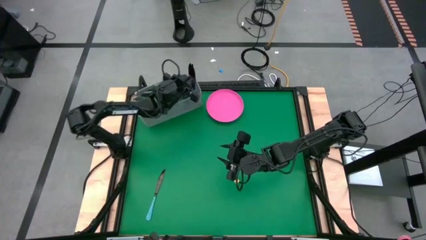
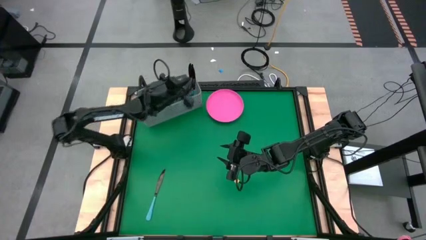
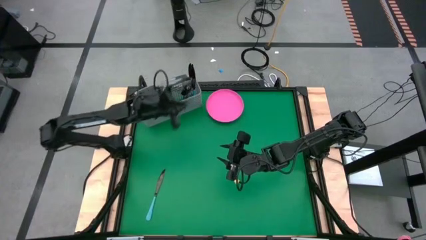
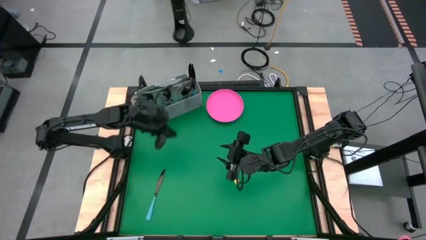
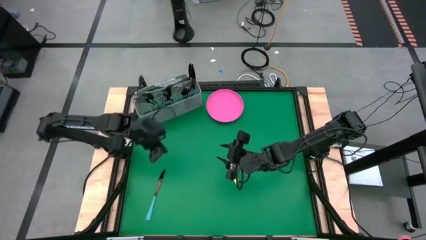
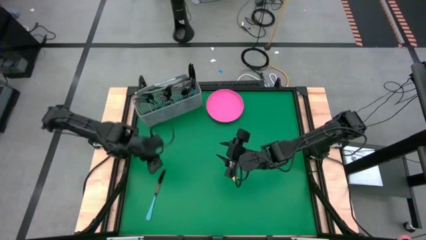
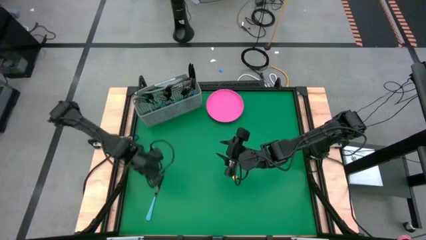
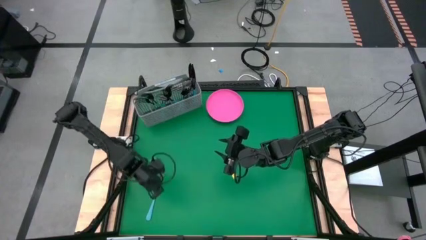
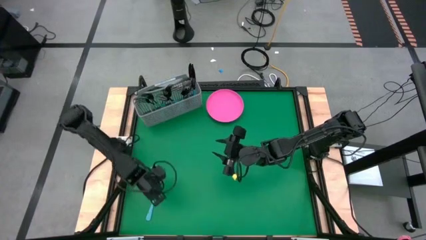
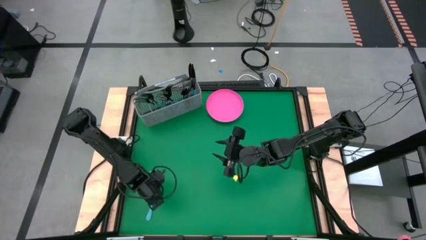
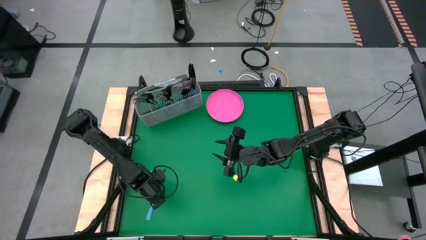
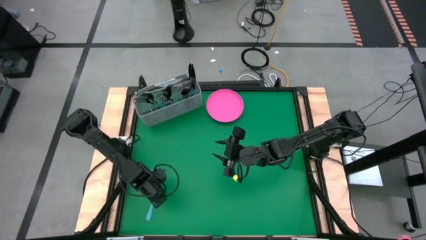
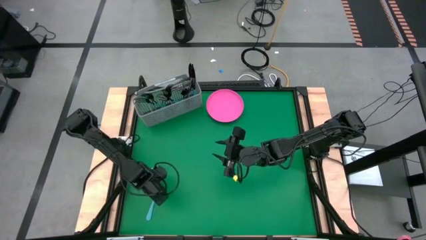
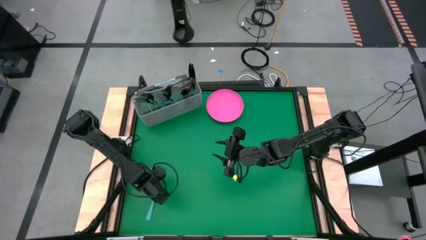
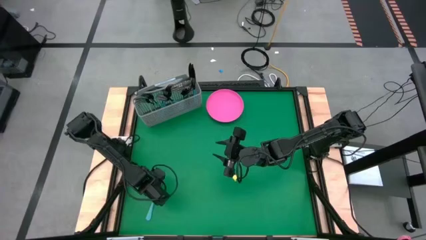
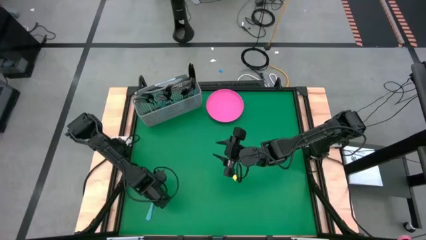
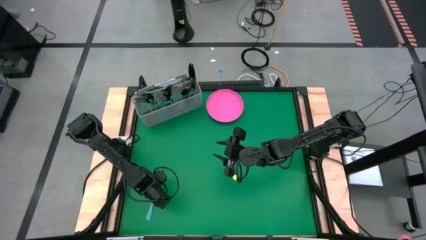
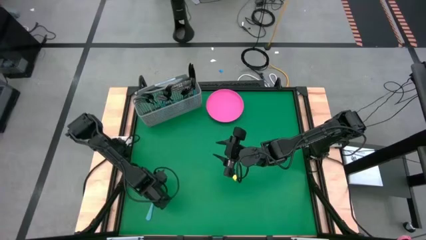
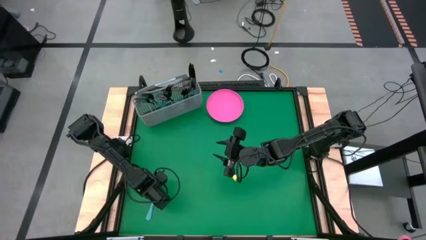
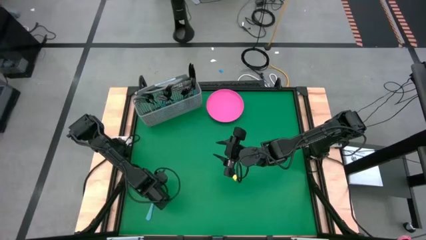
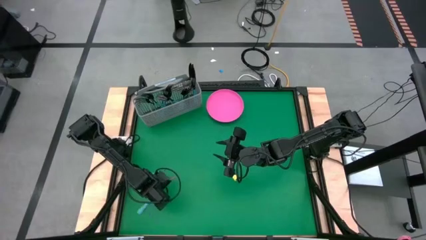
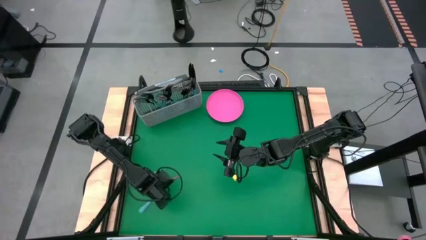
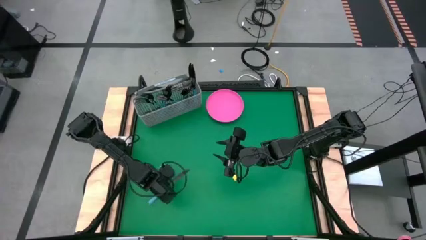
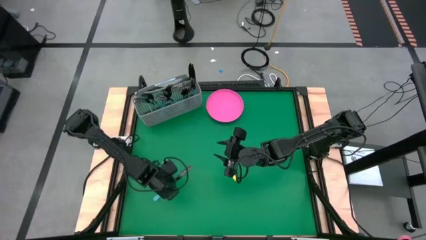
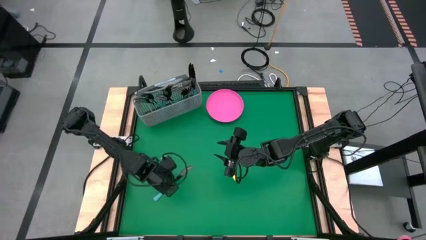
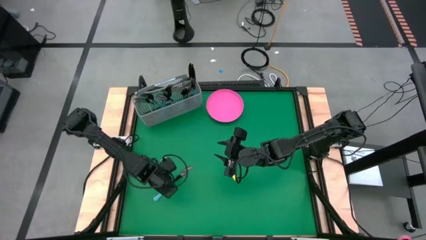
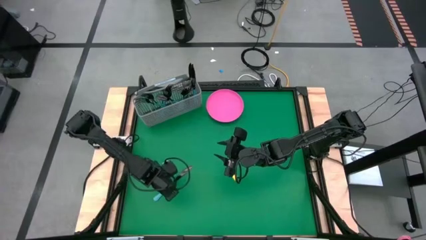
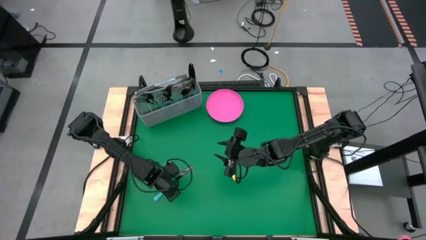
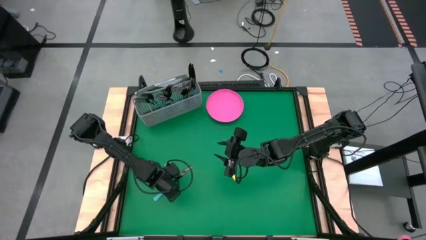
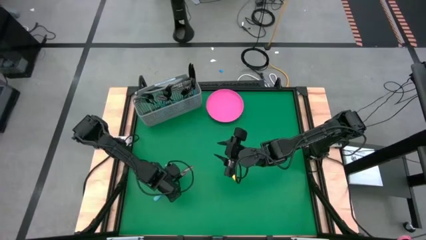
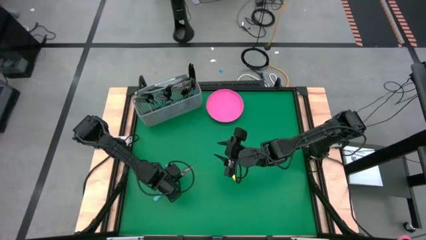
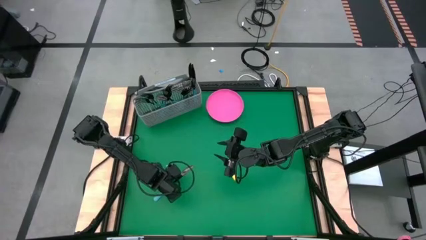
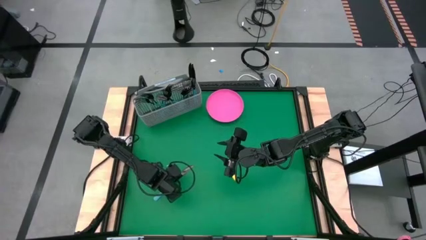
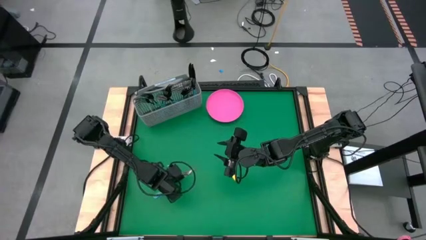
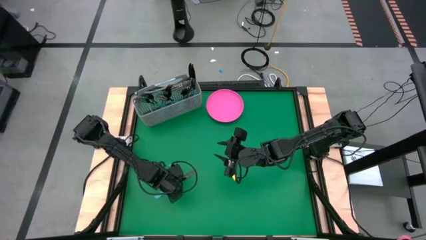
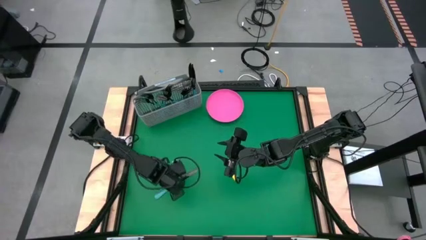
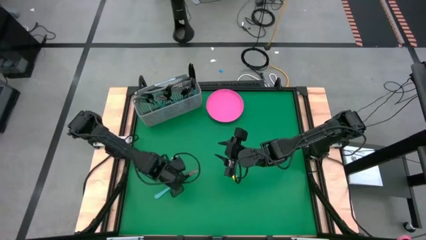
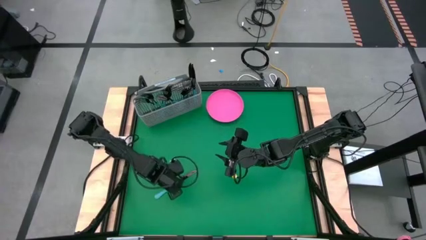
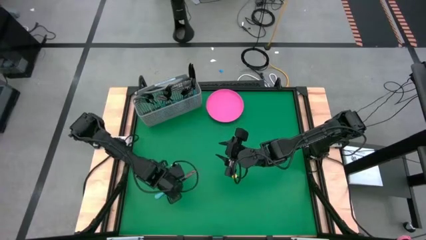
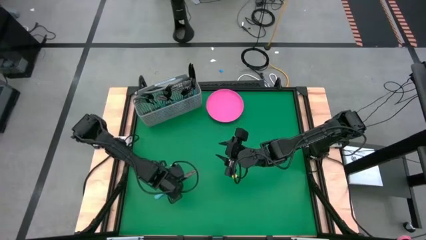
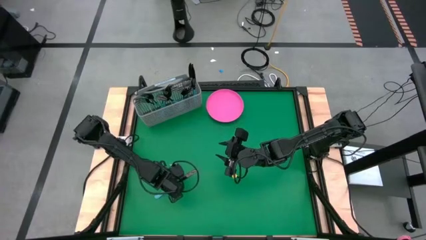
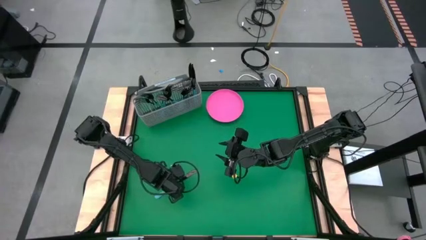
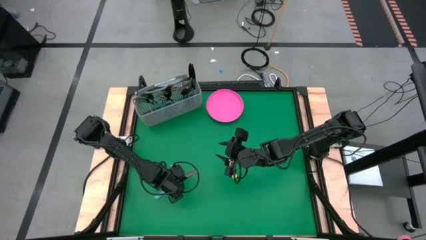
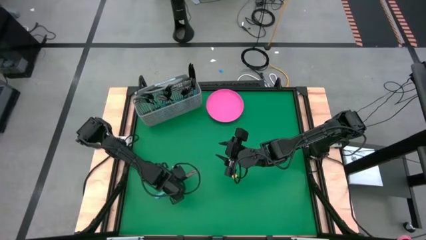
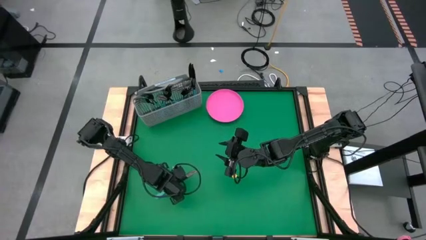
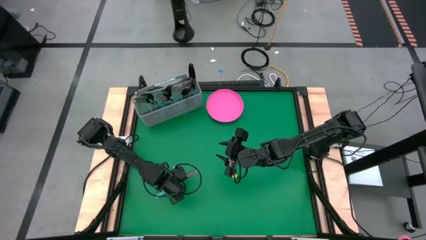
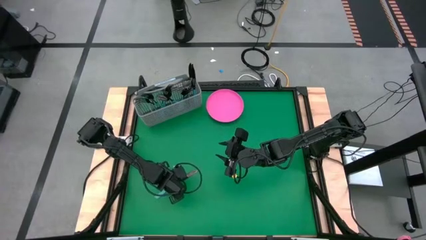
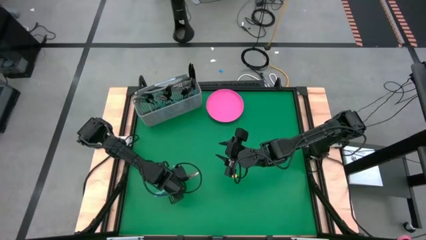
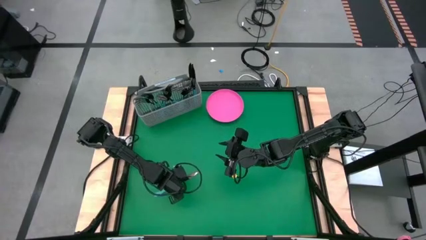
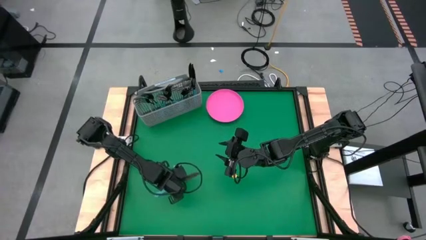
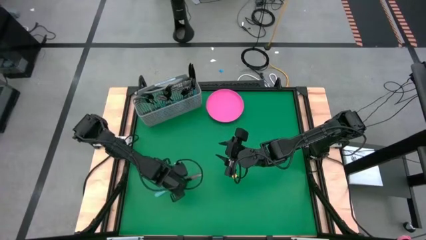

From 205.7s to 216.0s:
Task: Sort silverware
Put the blue knife into the gray silverware holder

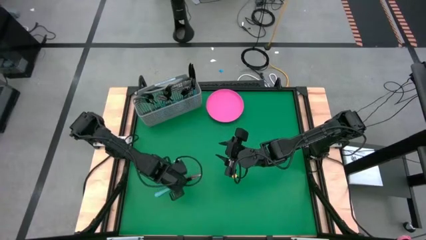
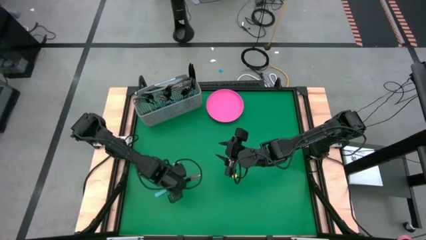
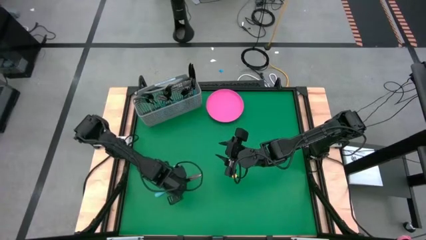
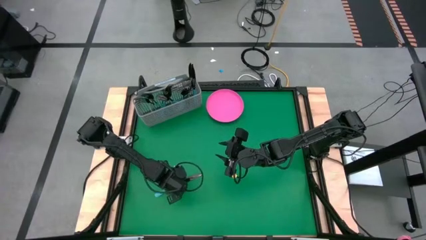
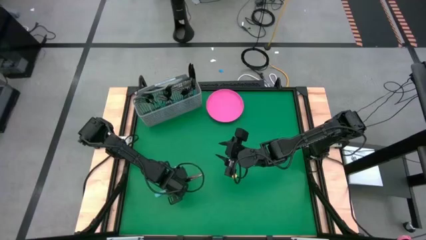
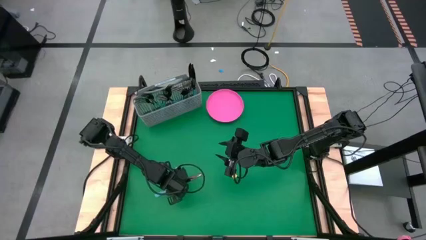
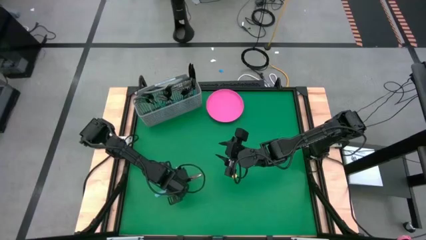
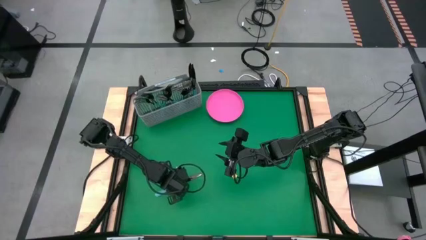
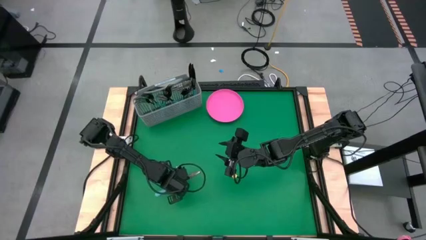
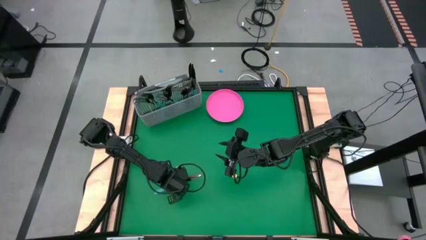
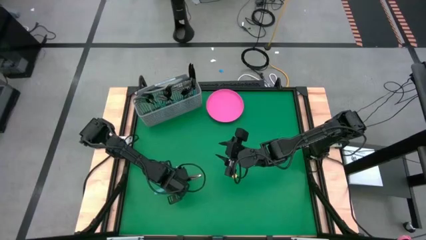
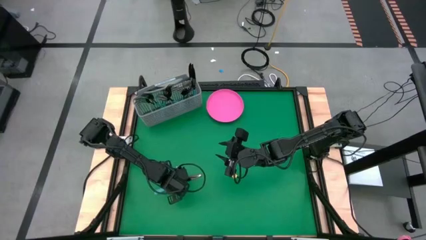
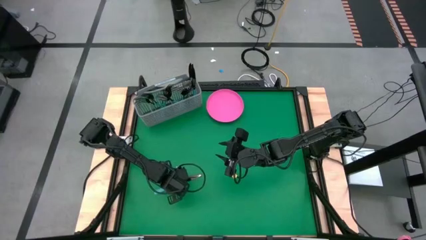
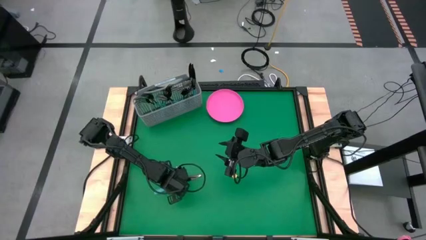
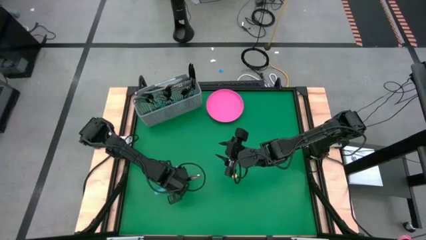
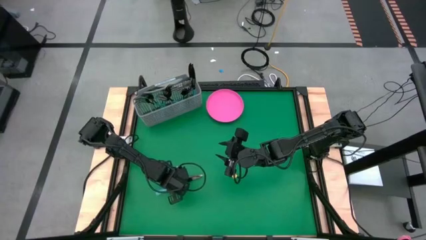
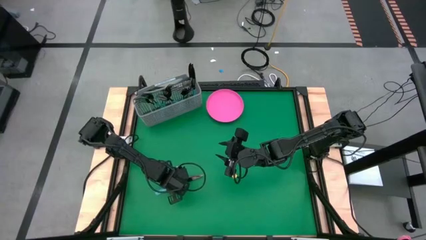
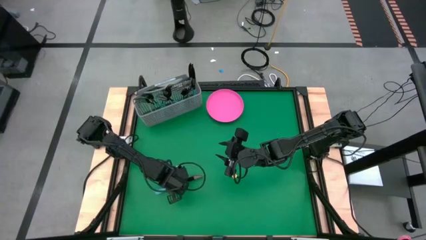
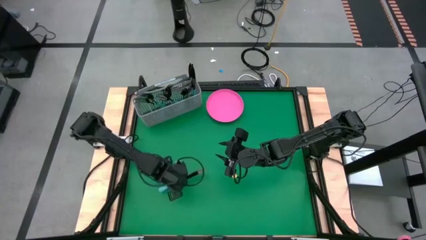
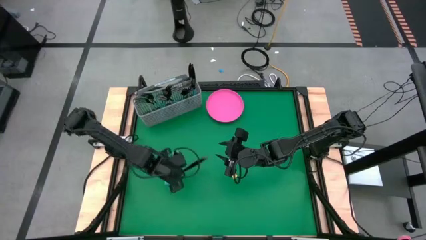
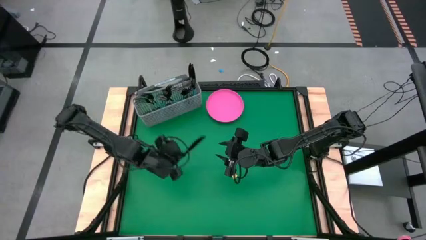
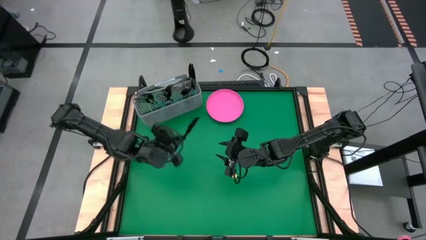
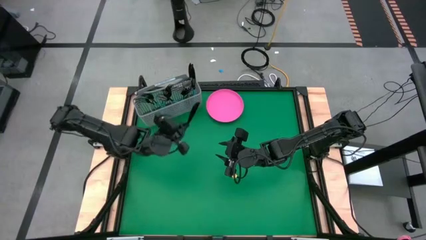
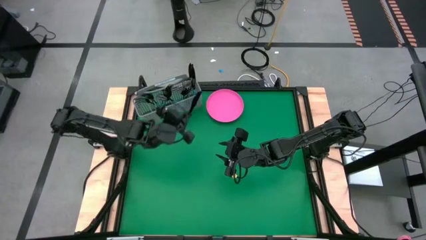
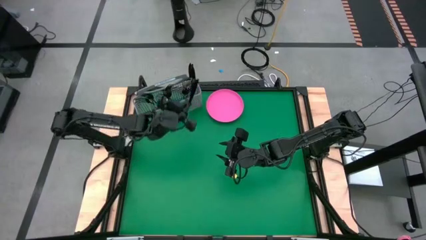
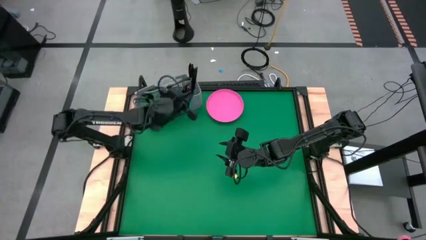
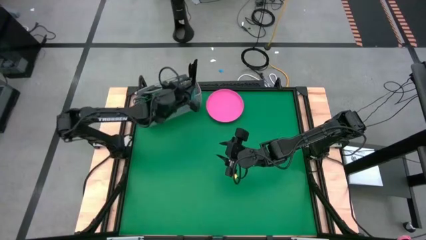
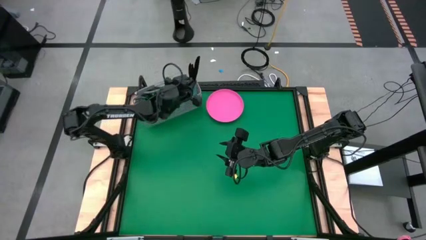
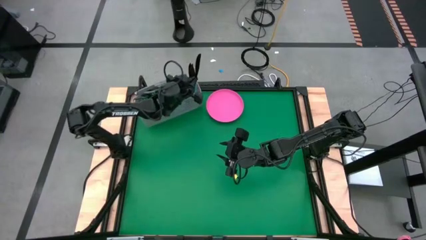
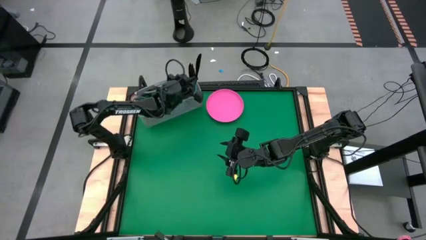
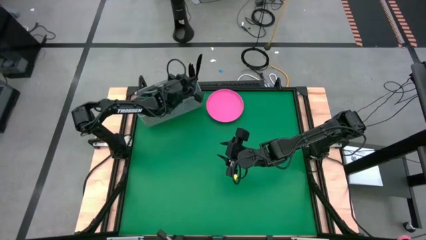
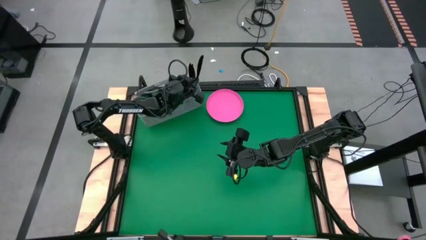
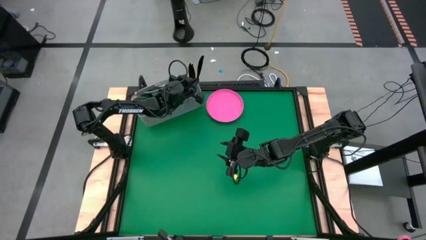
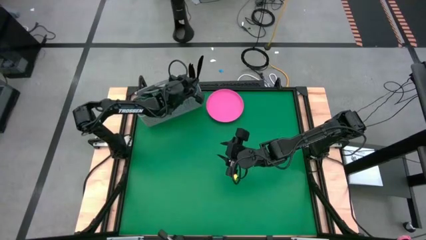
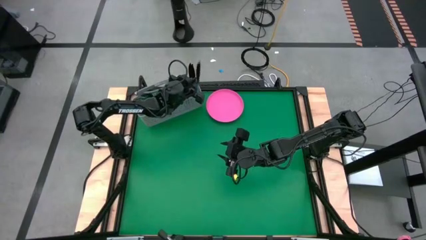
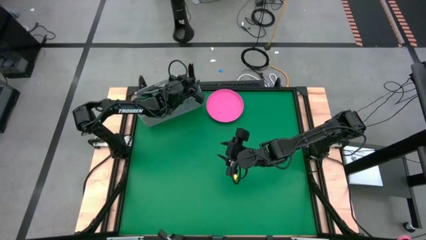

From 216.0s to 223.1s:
Put the blue knife into the gray silverware holder
